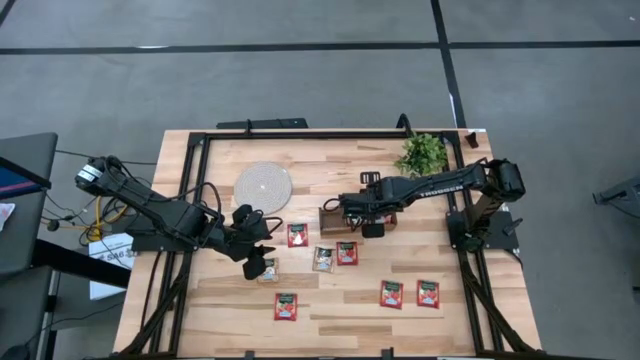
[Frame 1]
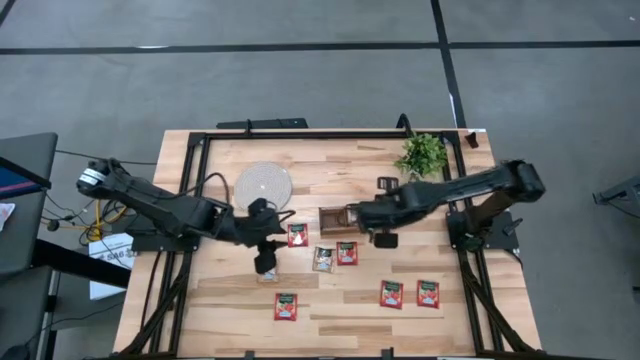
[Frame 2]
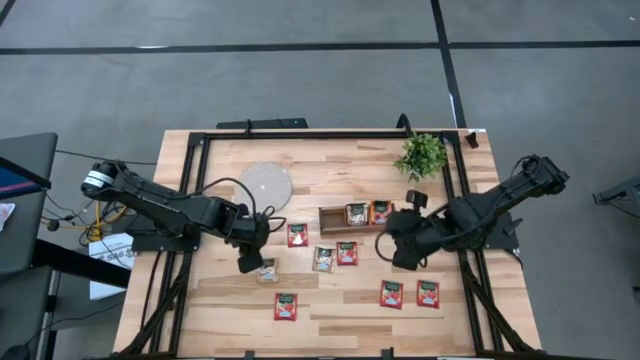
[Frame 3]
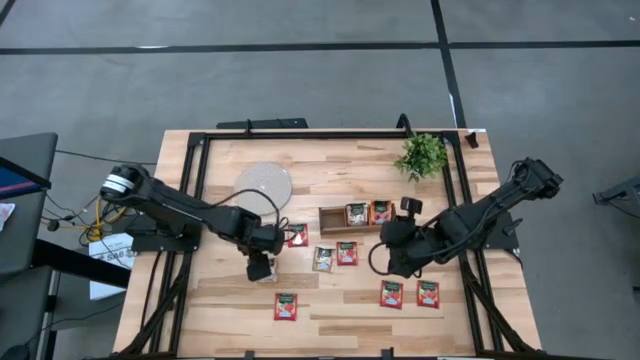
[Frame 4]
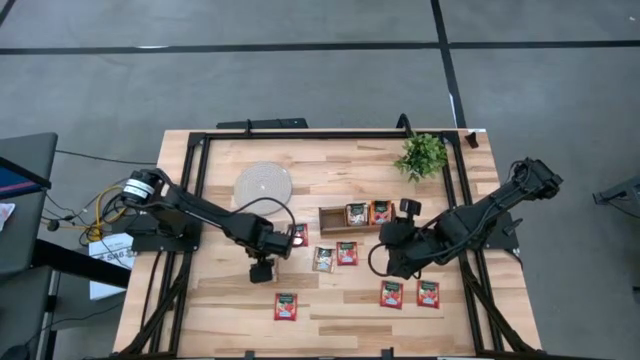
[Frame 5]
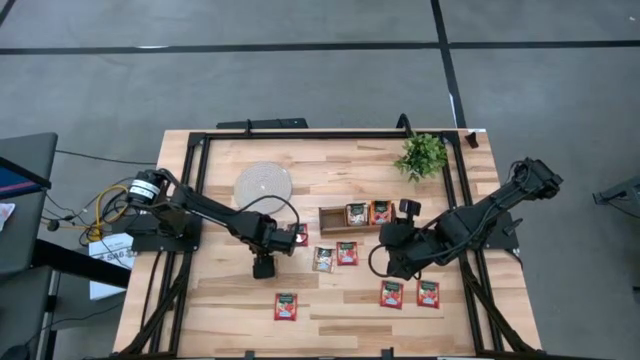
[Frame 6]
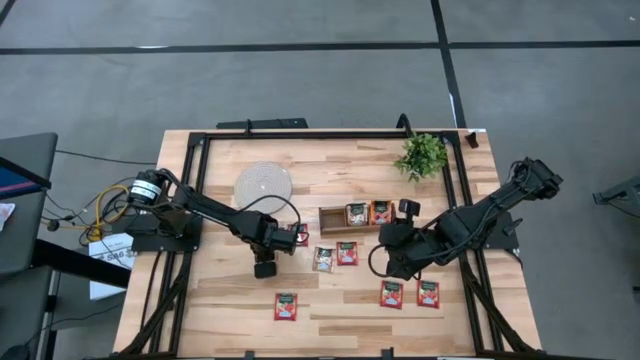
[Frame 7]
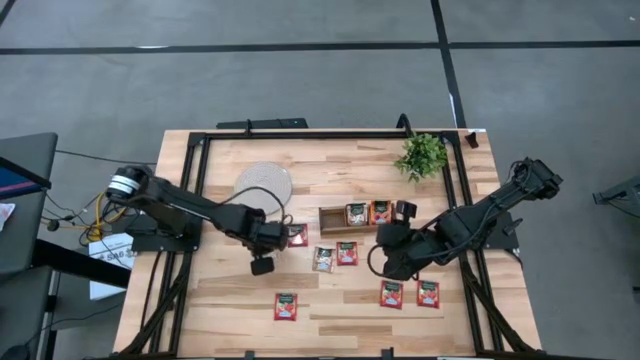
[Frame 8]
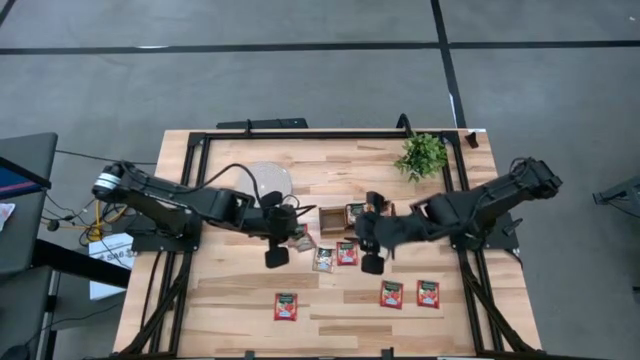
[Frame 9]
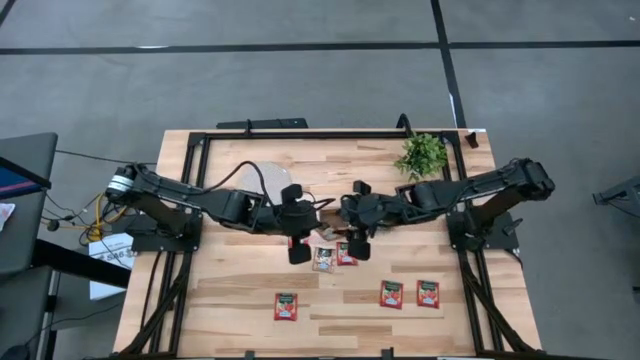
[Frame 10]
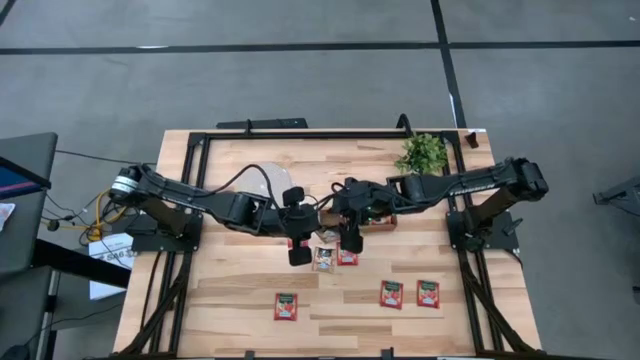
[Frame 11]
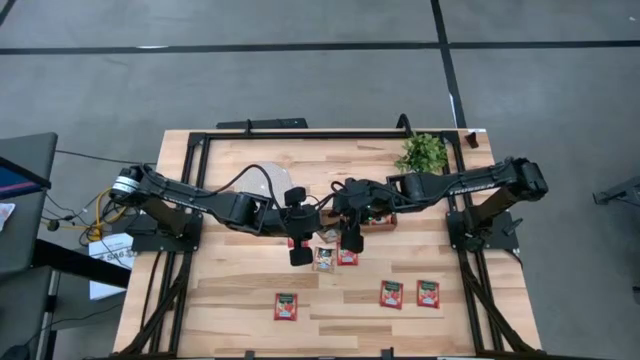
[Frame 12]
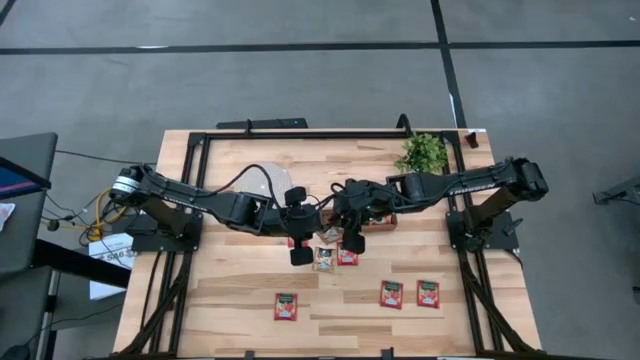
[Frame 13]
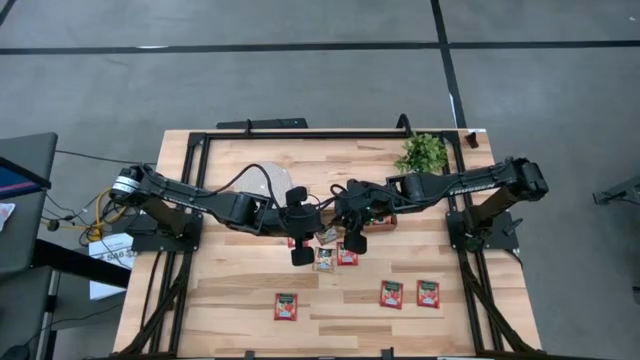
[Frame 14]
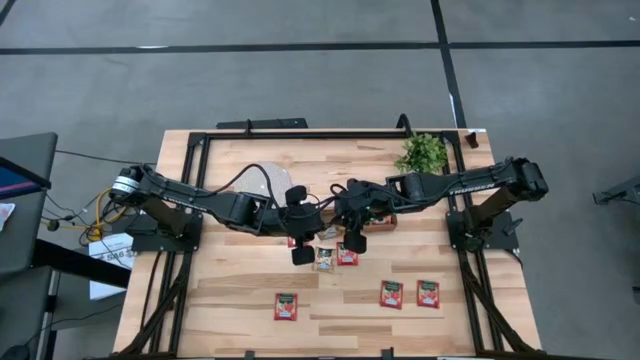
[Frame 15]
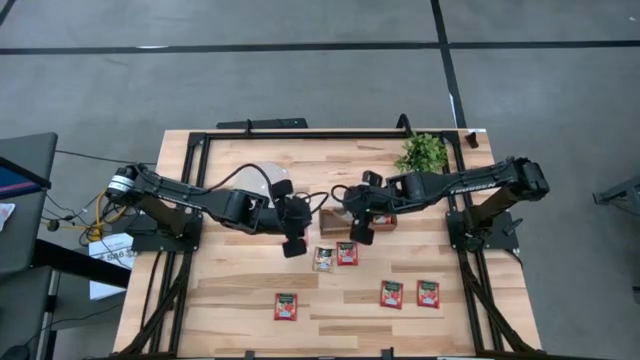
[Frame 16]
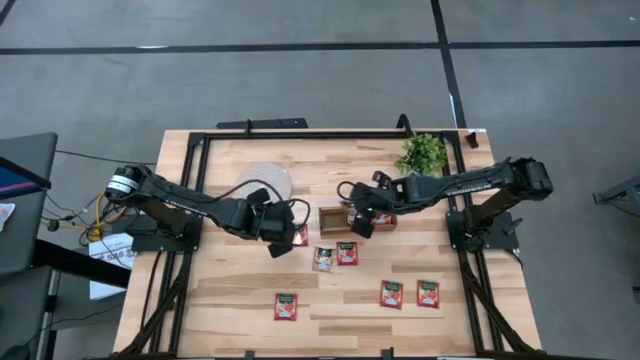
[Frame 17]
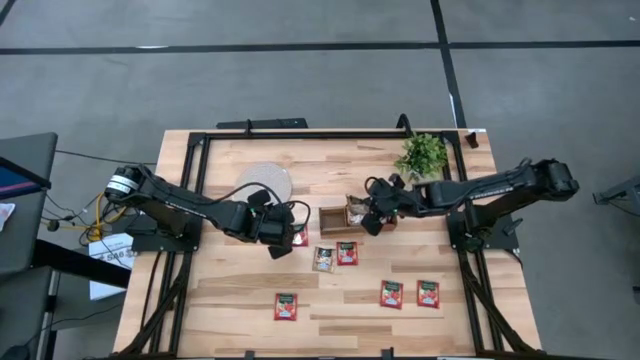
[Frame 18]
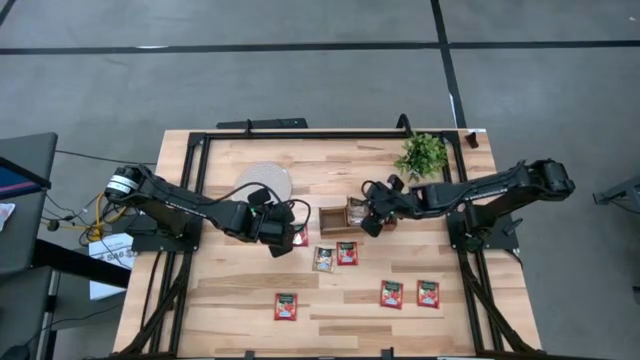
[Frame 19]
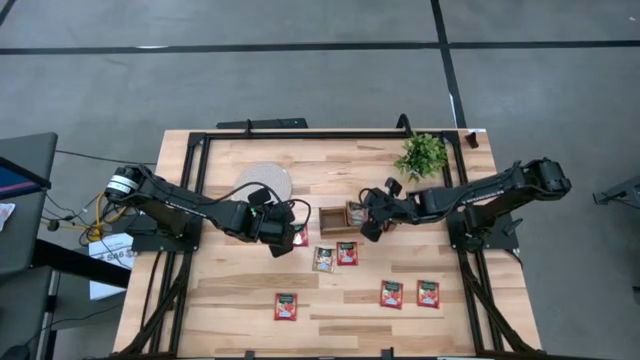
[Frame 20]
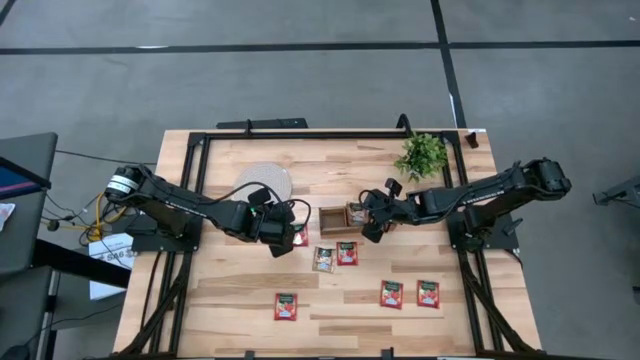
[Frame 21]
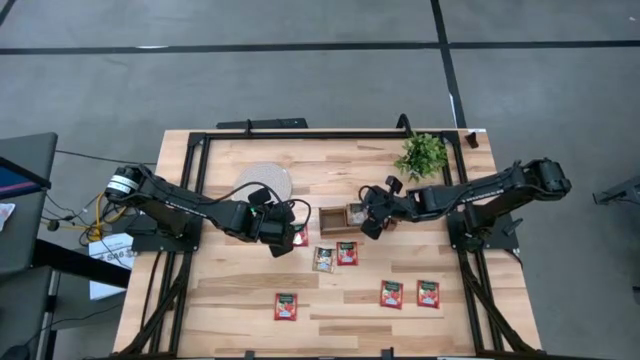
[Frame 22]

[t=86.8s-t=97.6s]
Task: Pick & Place Tea
Put the brown tea bag into the middle section of the wooden organizer

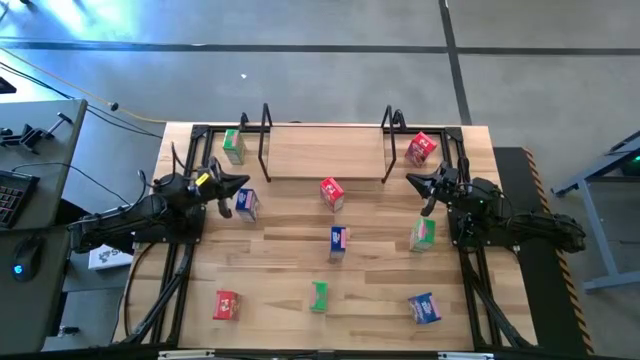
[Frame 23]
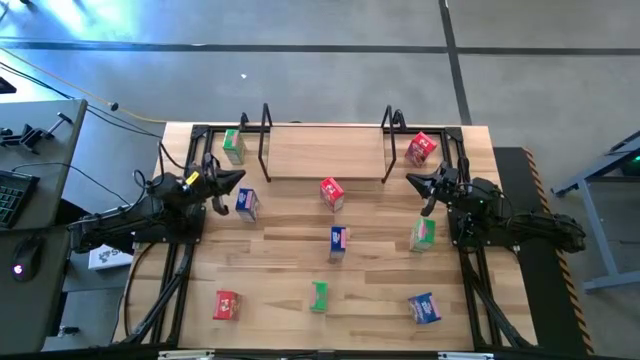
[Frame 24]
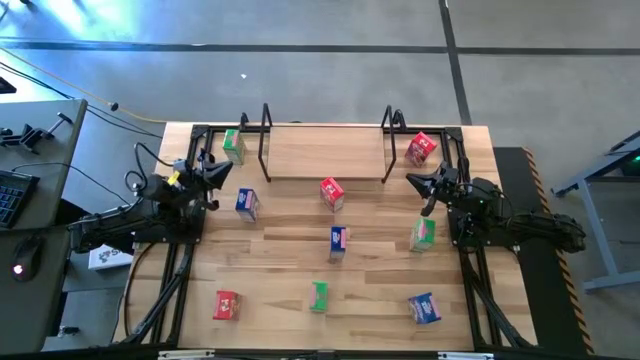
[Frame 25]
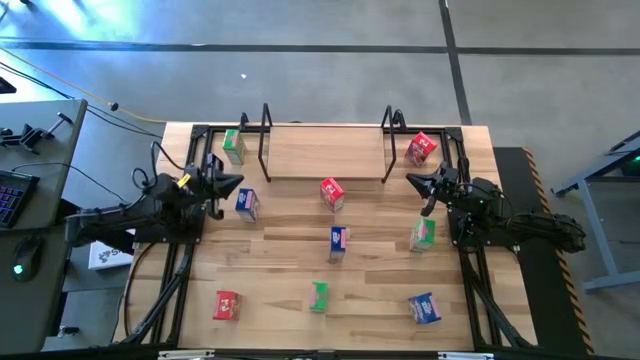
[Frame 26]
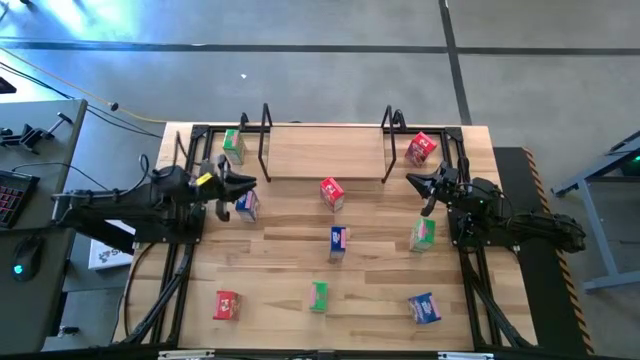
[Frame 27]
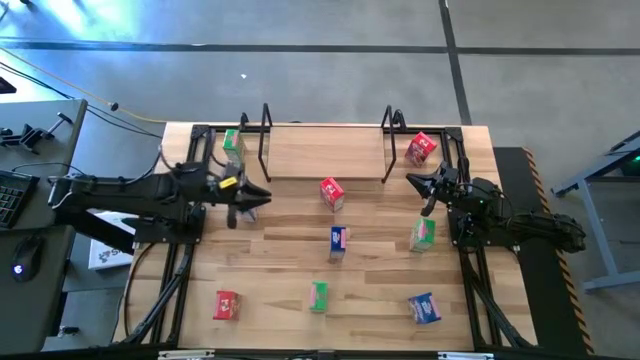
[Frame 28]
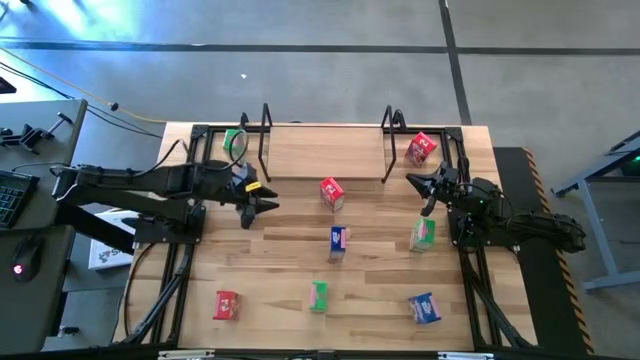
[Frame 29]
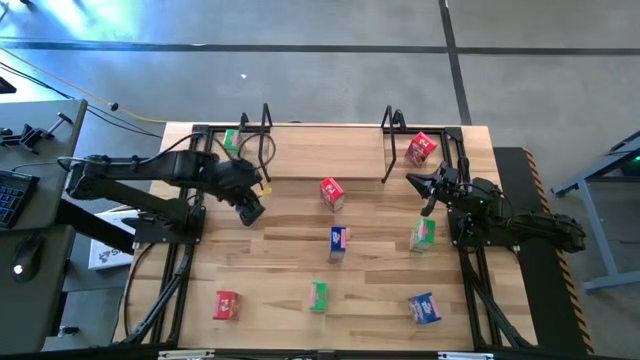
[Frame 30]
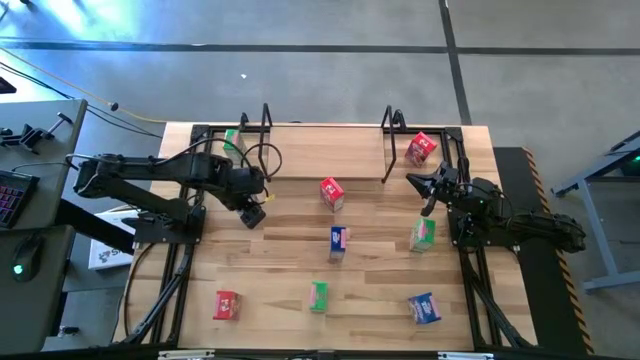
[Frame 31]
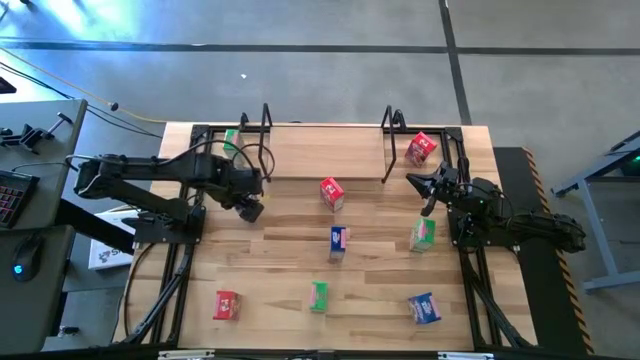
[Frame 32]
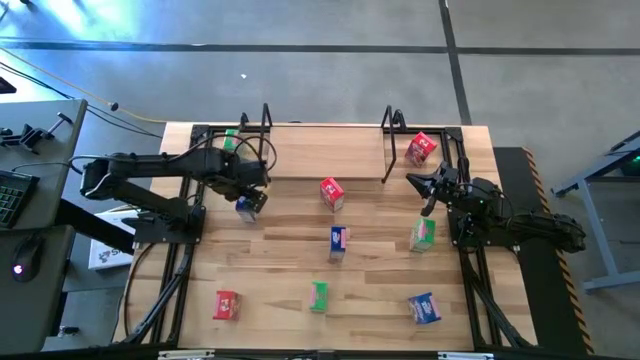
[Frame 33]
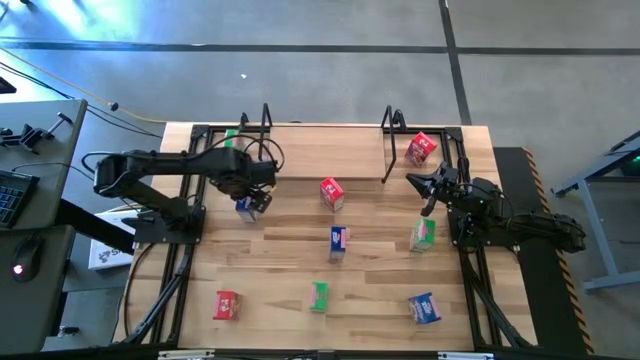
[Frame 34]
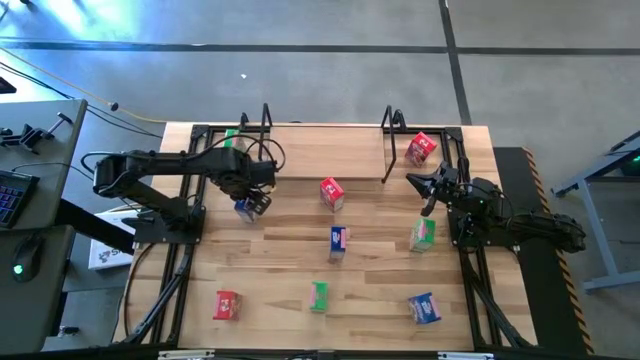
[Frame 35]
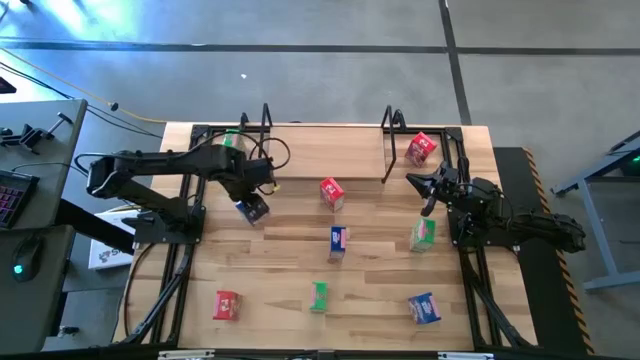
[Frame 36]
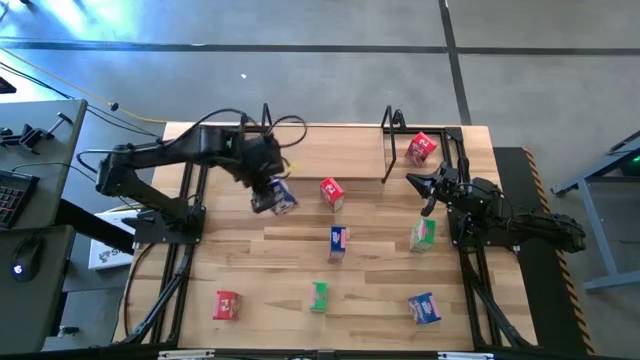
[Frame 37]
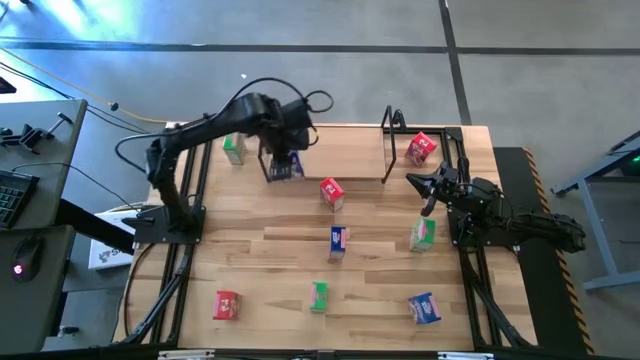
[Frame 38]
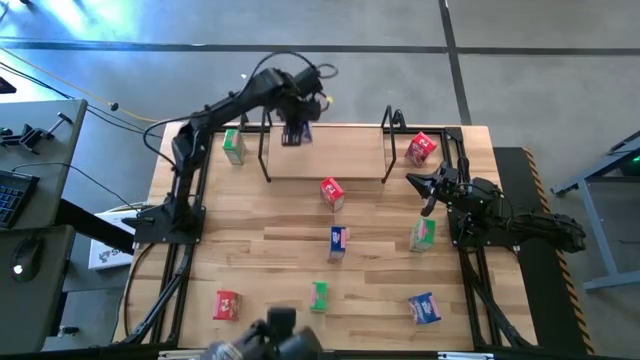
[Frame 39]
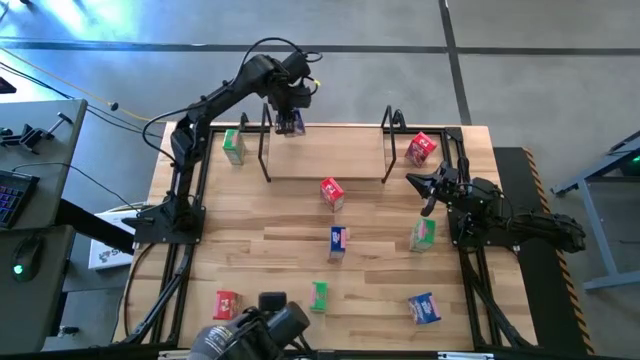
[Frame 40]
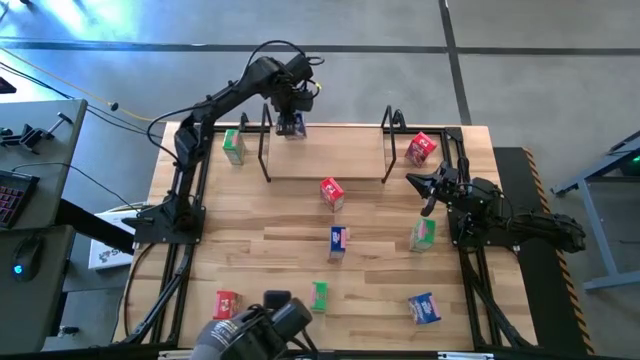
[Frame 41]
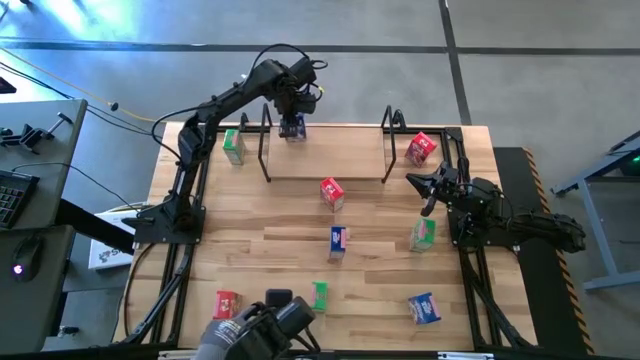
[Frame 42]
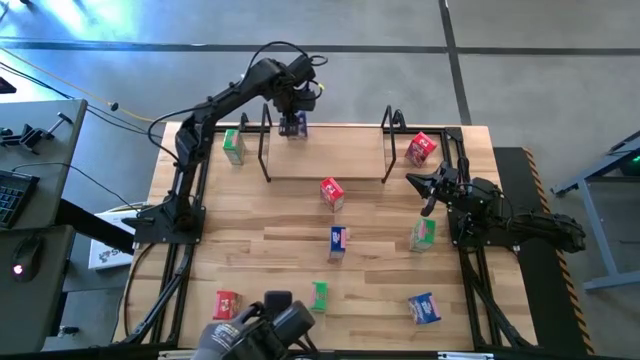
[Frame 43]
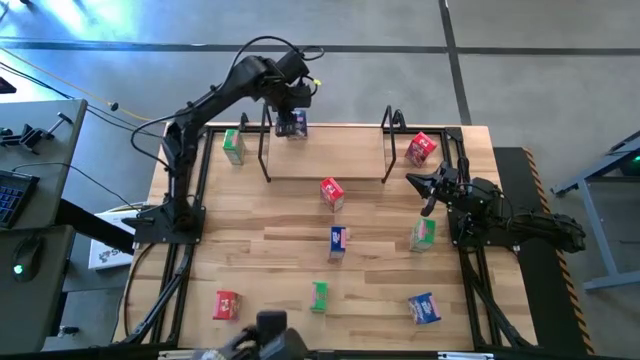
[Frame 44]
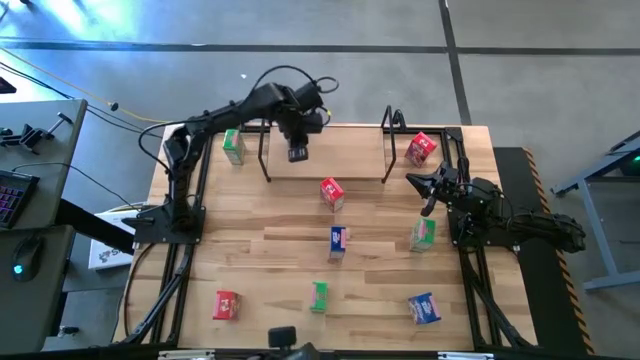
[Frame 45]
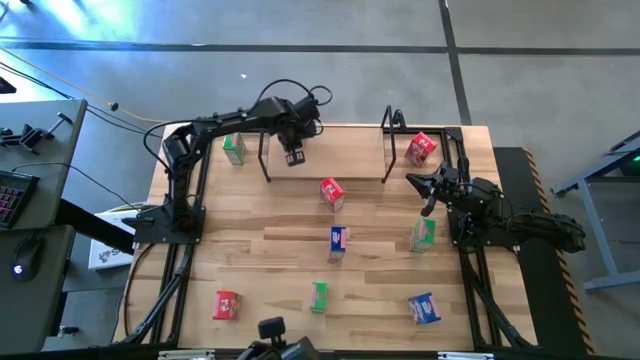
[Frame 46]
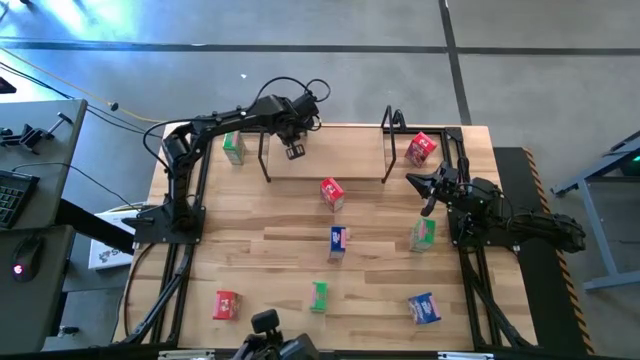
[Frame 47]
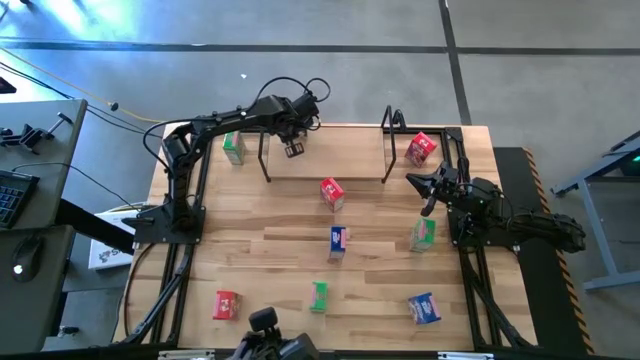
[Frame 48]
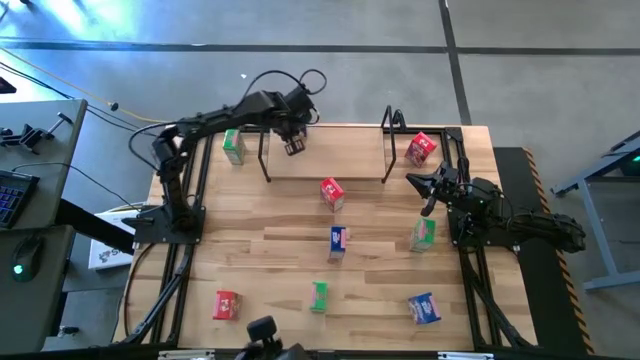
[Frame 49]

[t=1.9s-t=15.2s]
Task: Stack cereal on shelf
Put the top left blue cereal box on the shelf
